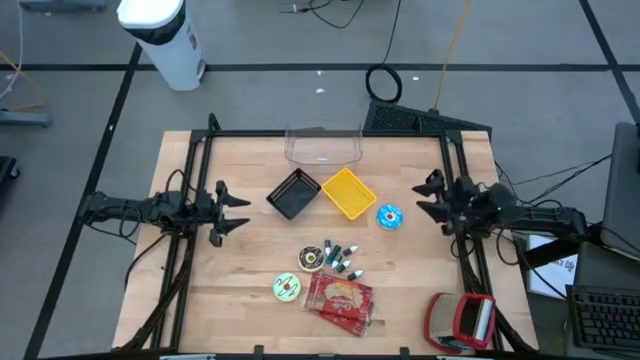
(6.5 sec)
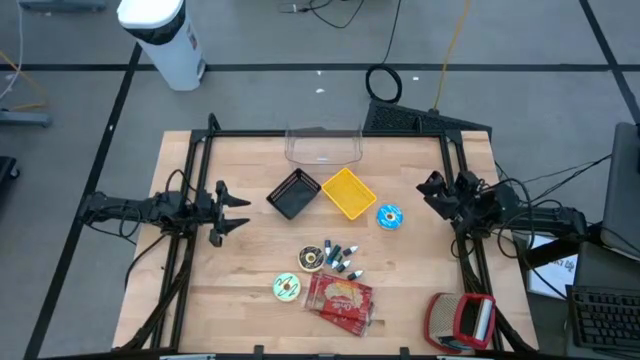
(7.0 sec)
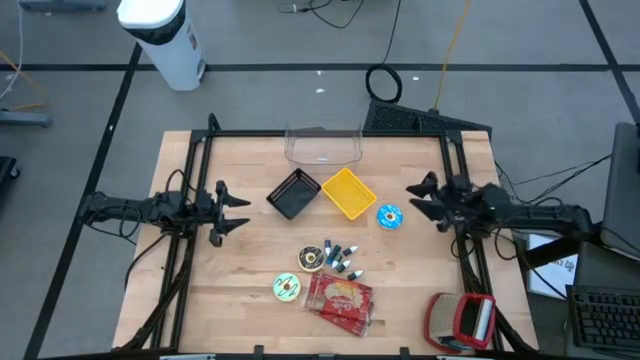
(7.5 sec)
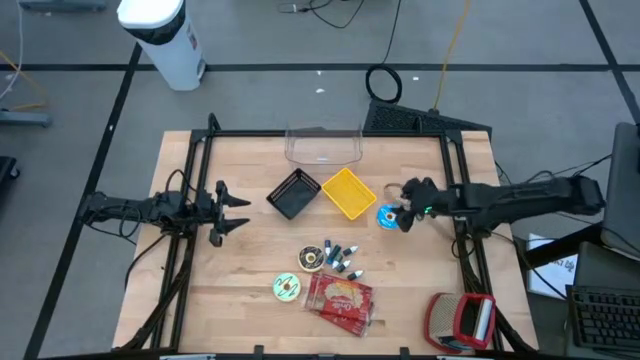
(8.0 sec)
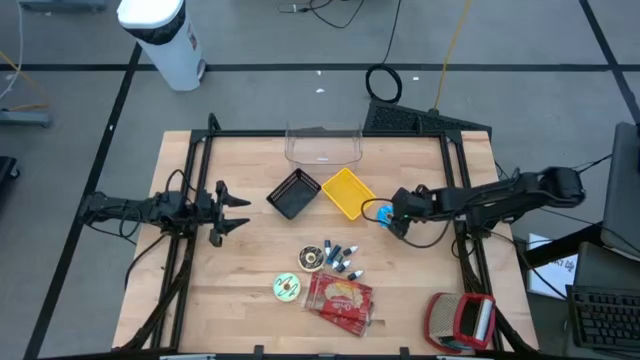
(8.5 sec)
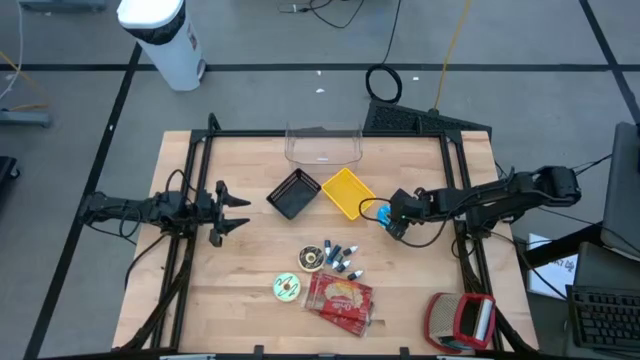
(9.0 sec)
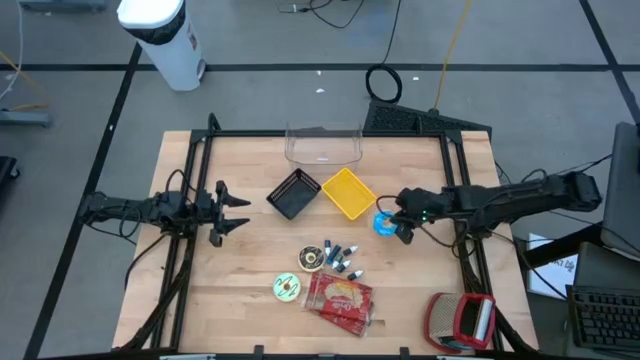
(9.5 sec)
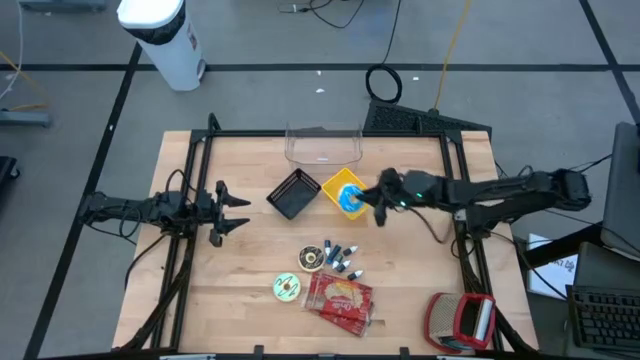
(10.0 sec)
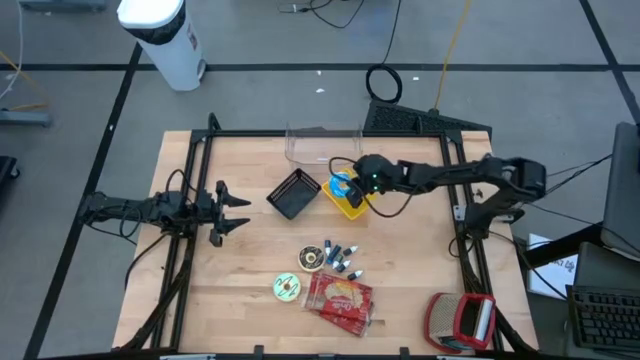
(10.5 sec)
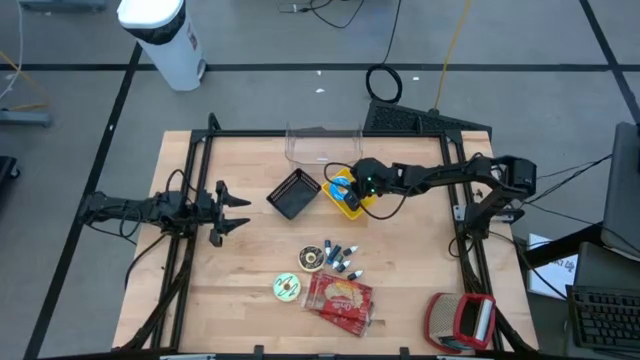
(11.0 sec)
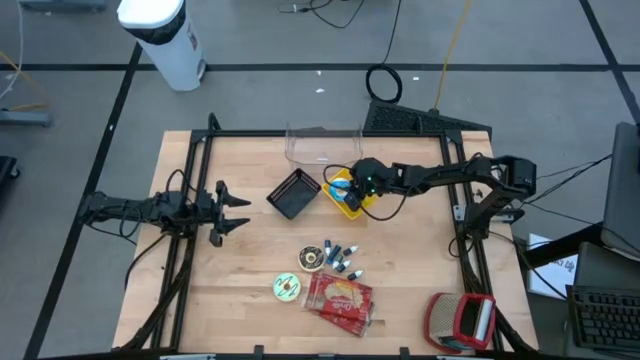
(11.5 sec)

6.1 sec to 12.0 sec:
Put the blue donut into the yellow bin

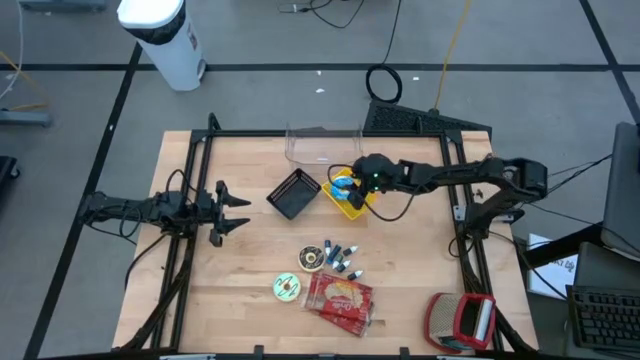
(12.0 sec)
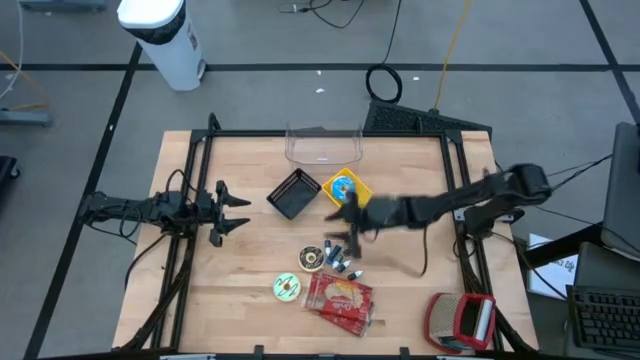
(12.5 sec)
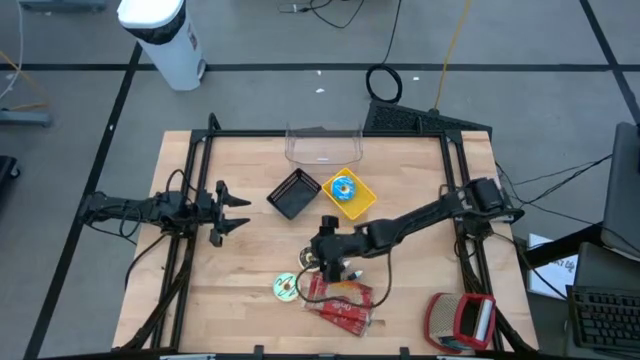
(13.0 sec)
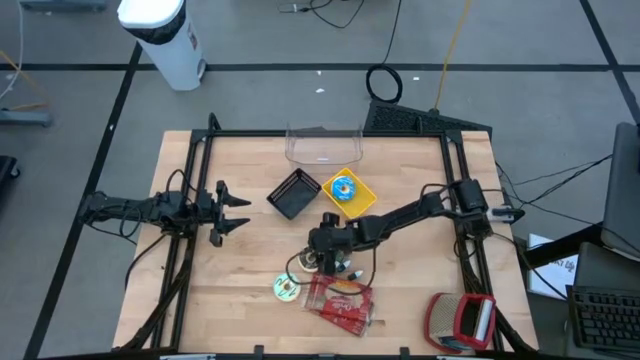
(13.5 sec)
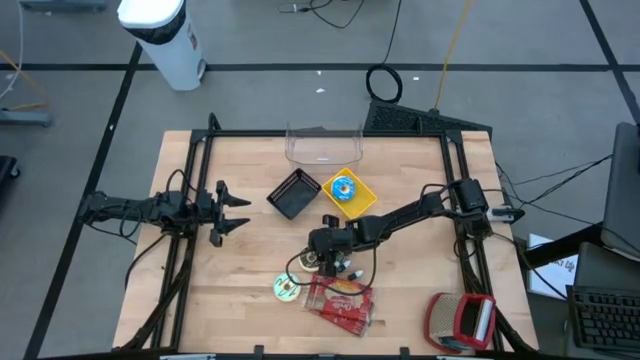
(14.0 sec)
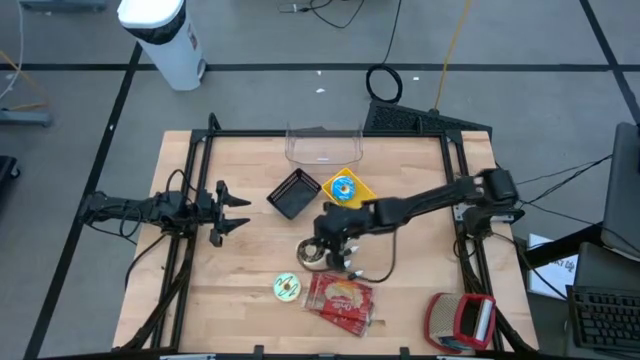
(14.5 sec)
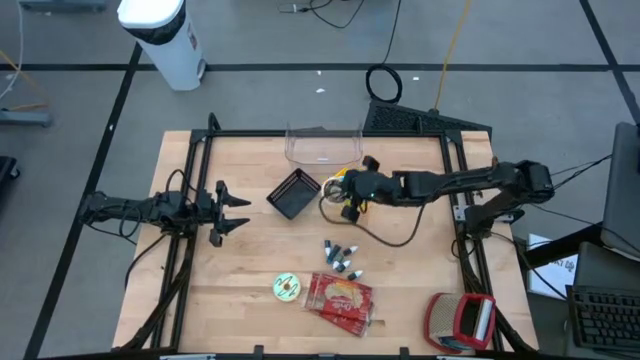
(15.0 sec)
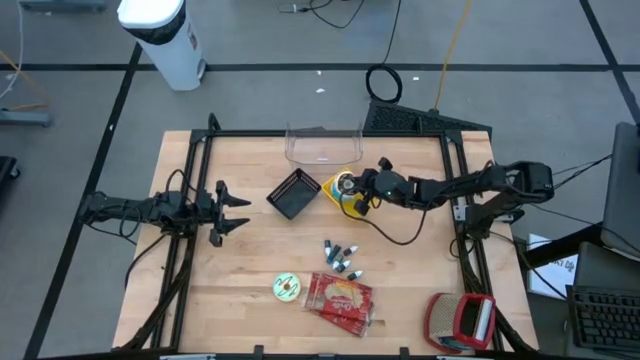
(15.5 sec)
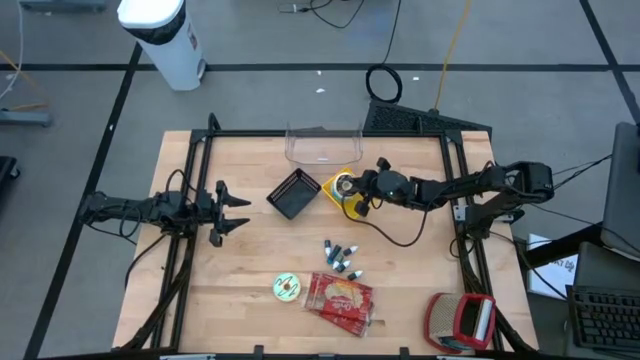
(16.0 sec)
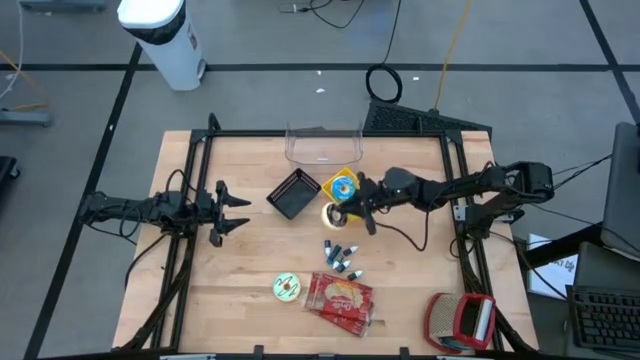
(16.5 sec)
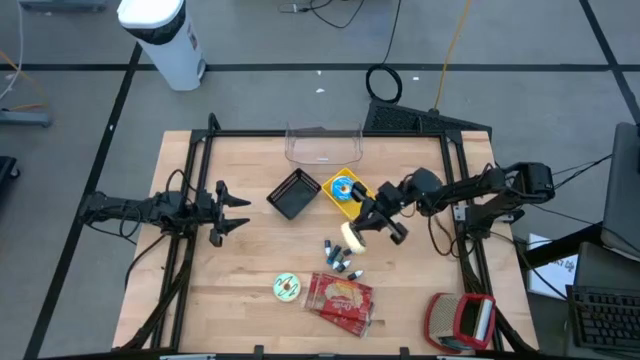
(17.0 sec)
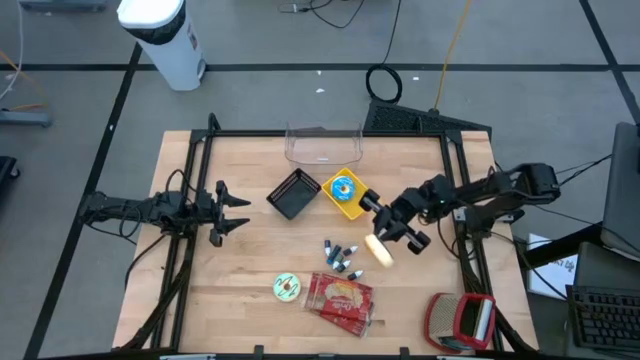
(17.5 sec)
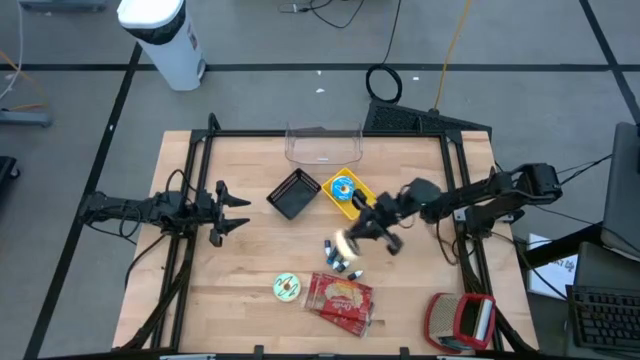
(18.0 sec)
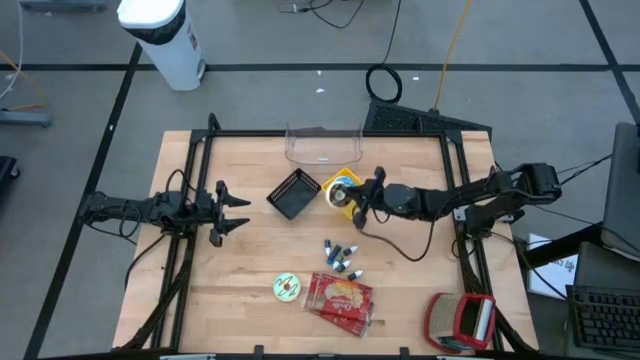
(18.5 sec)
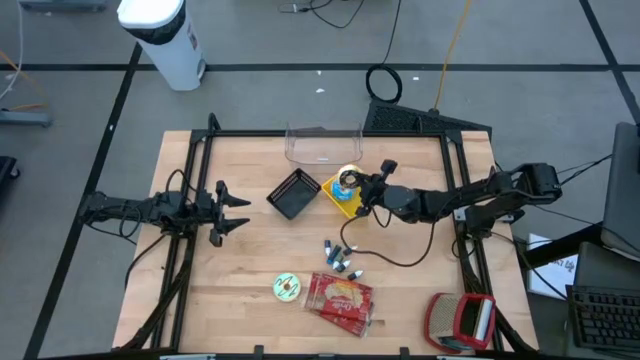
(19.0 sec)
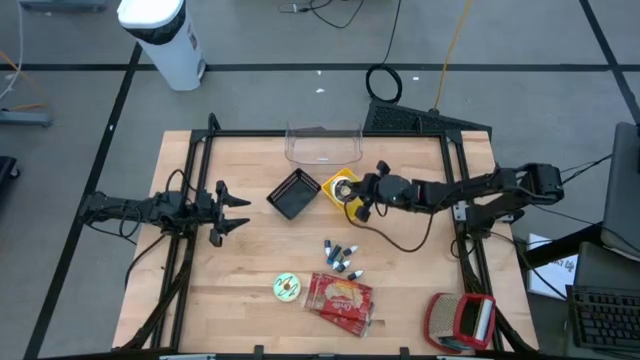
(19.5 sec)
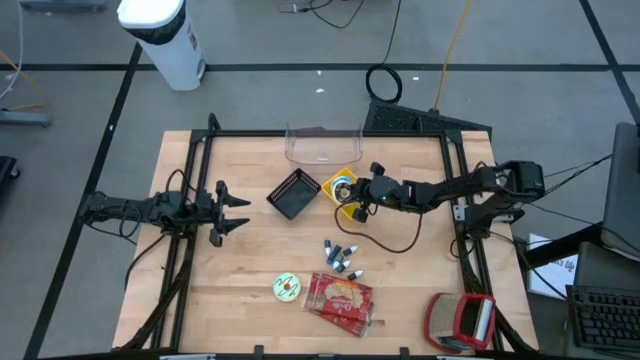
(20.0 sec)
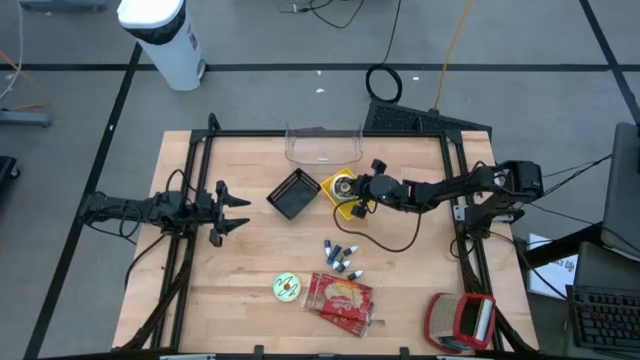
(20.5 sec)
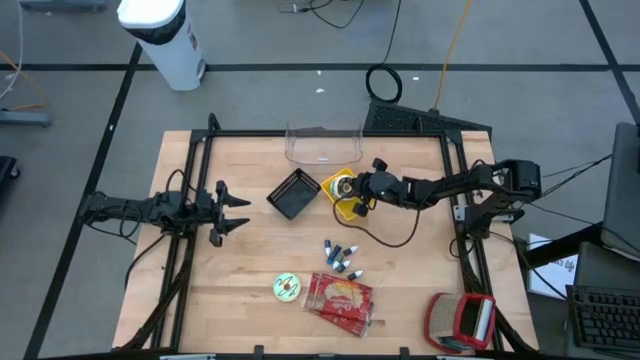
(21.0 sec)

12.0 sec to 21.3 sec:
Put the black donut into the yellow bin

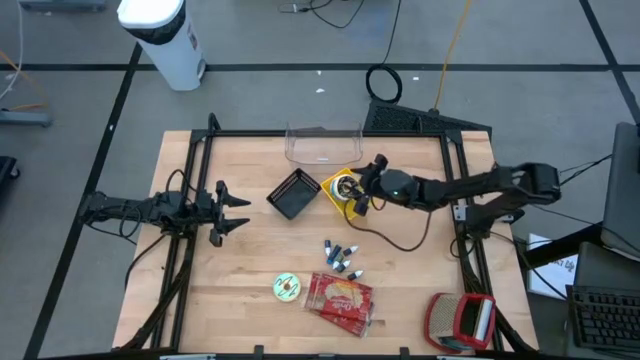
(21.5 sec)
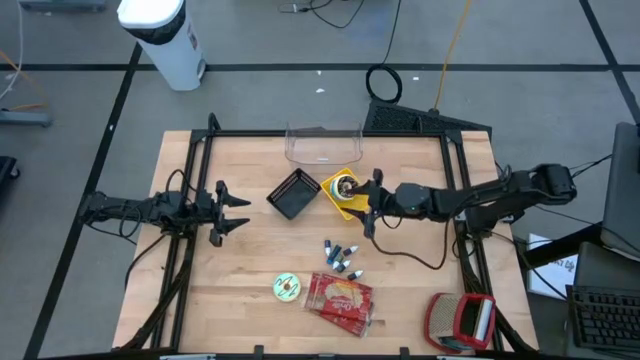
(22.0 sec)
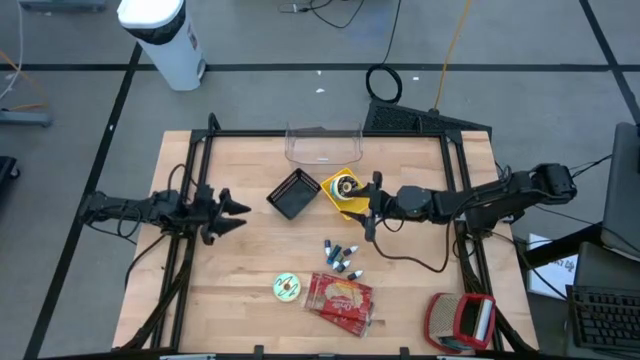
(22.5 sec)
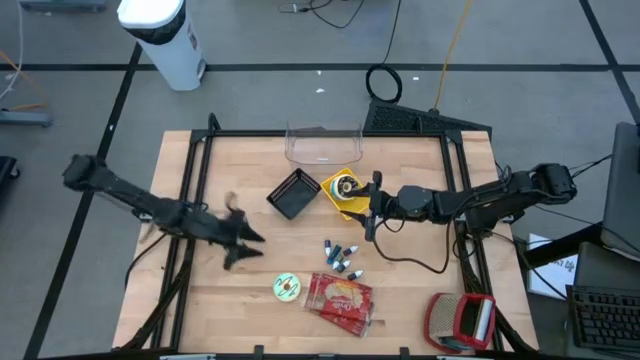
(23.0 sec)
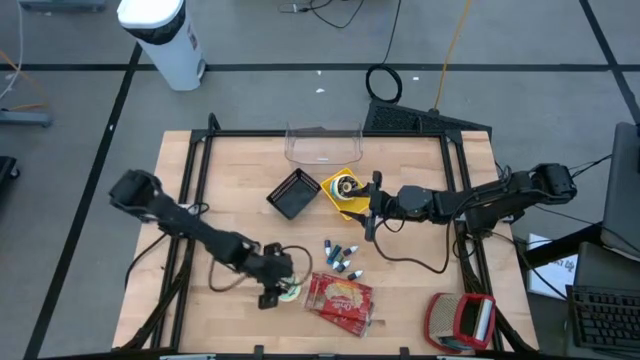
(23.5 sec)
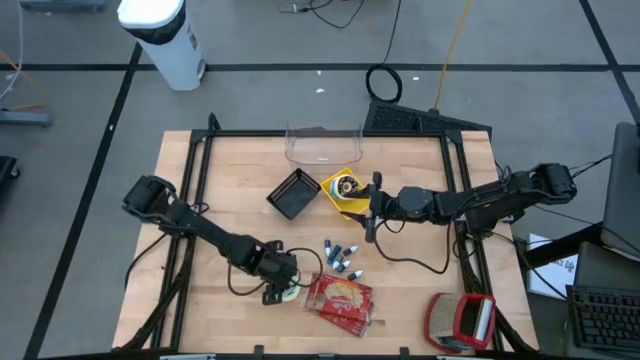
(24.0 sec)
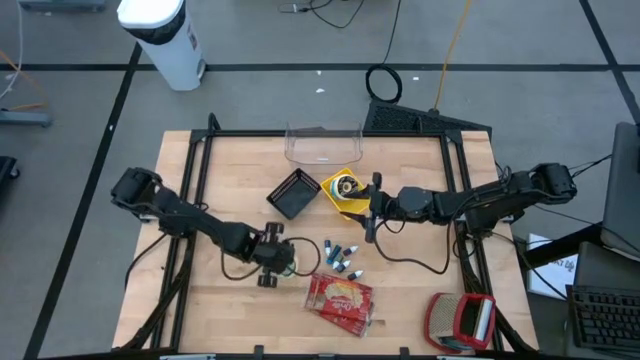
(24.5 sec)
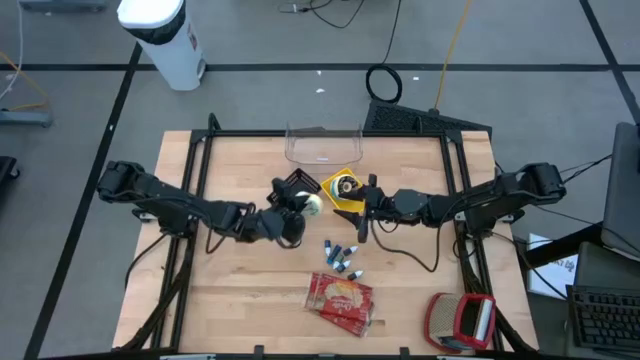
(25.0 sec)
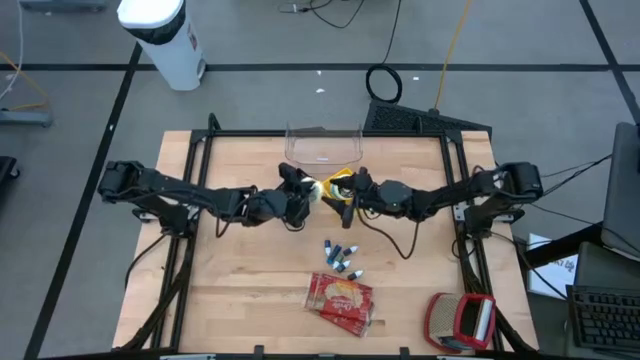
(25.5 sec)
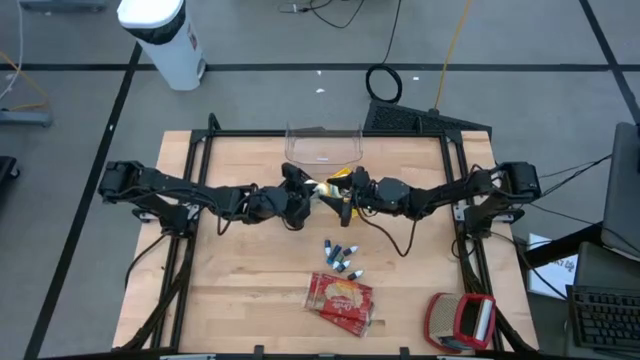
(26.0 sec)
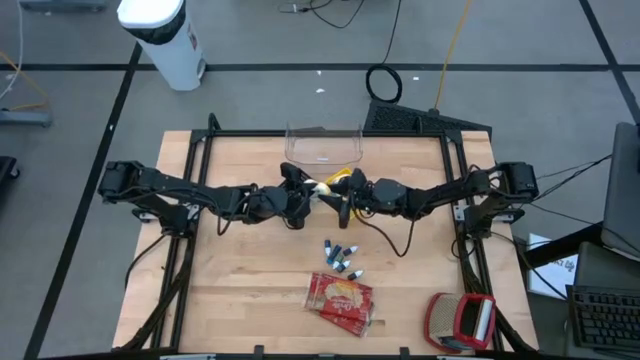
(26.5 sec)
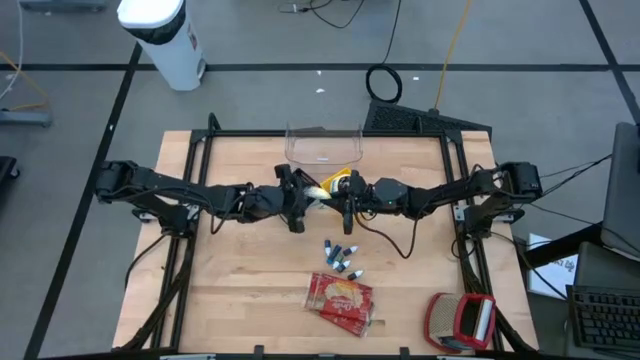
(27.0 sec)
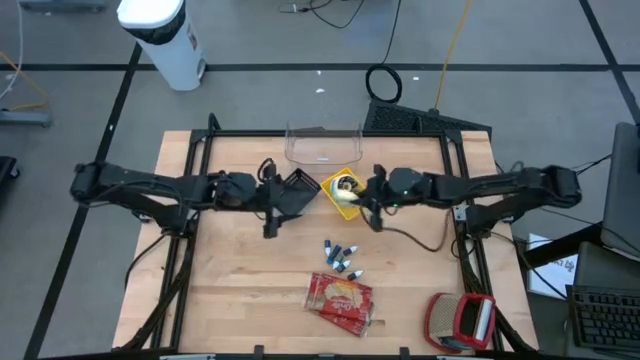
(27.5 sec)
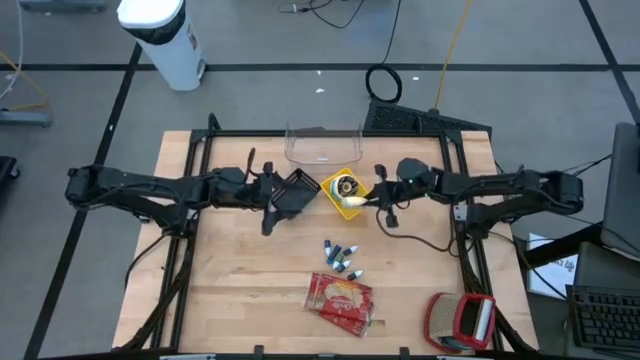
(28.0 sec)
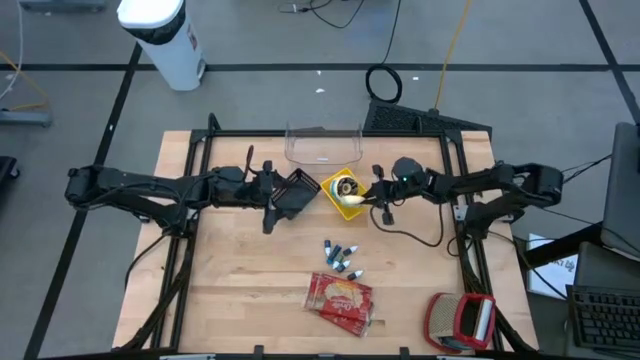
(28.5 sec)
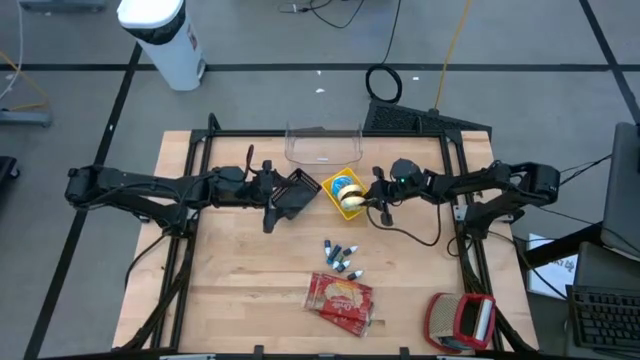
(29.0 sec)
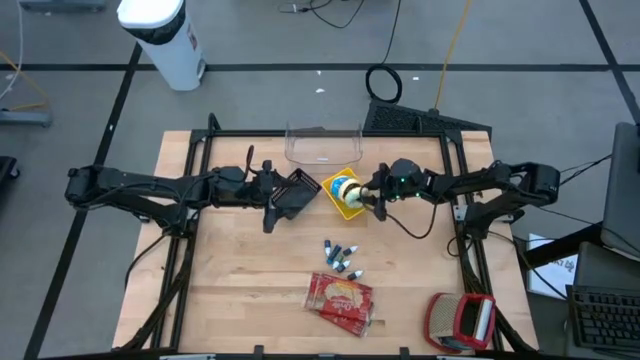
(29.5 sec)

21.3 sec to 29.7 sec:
Put the blue donut into the yellow bin
